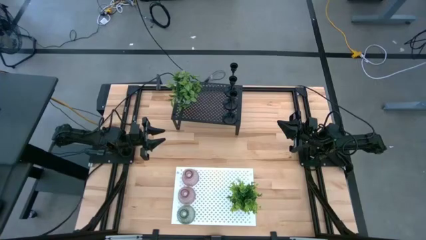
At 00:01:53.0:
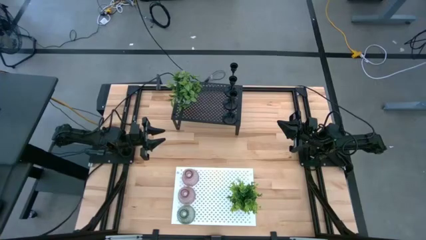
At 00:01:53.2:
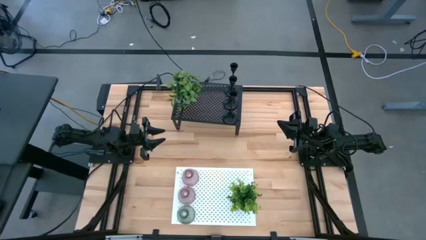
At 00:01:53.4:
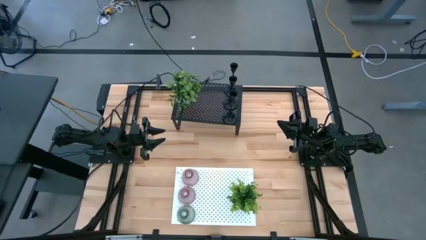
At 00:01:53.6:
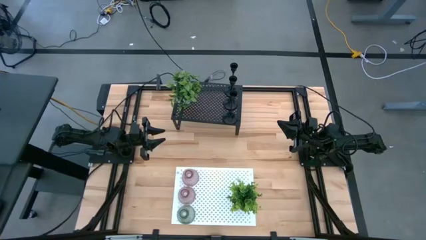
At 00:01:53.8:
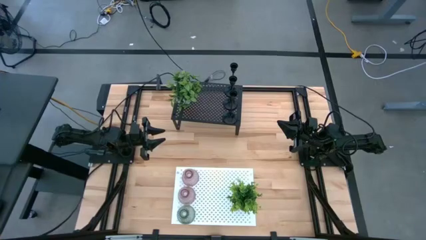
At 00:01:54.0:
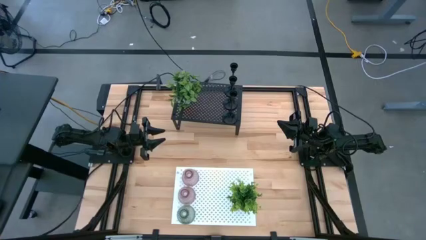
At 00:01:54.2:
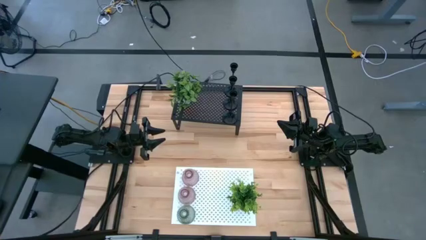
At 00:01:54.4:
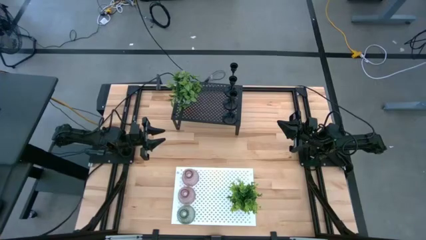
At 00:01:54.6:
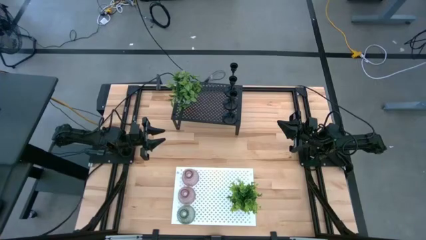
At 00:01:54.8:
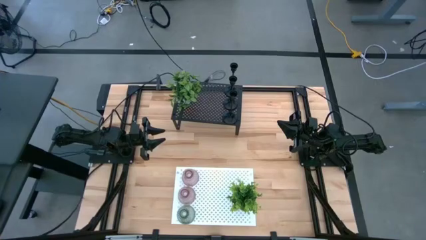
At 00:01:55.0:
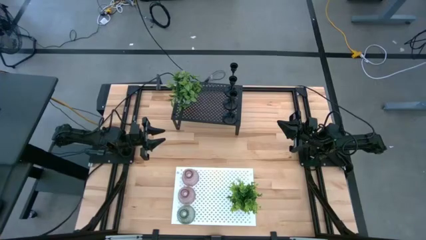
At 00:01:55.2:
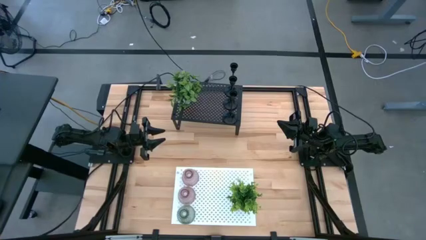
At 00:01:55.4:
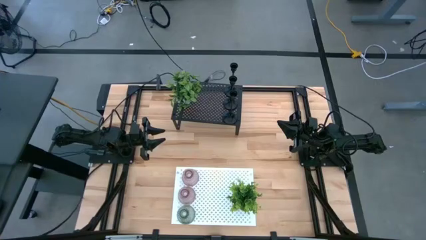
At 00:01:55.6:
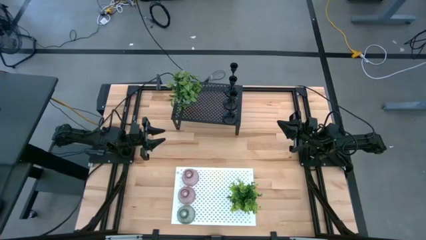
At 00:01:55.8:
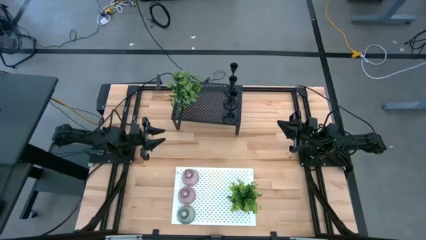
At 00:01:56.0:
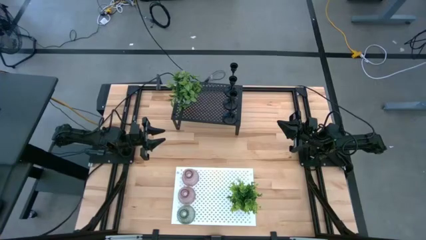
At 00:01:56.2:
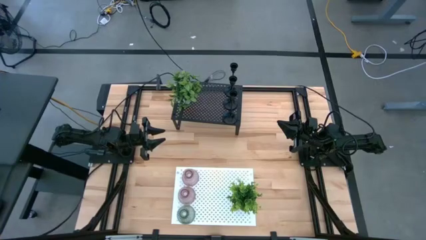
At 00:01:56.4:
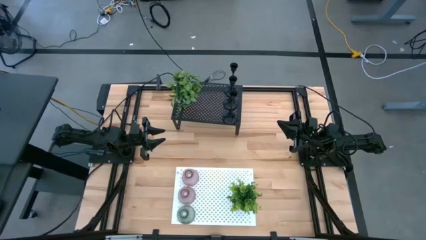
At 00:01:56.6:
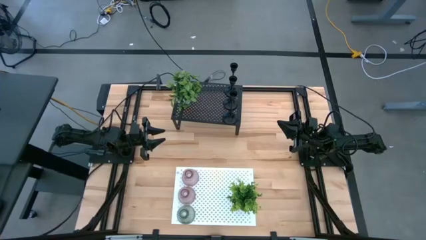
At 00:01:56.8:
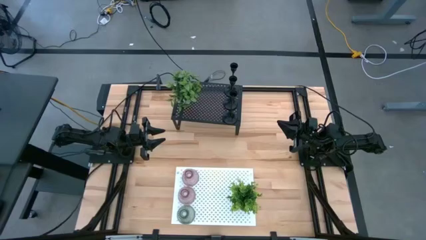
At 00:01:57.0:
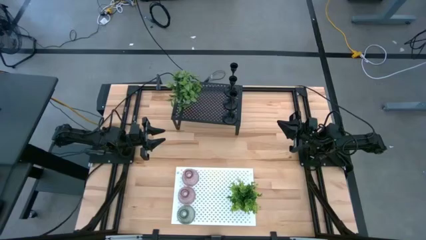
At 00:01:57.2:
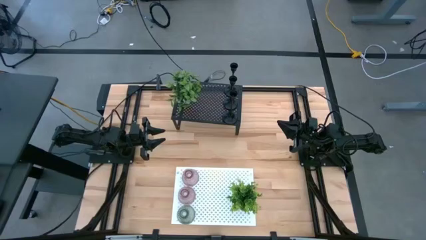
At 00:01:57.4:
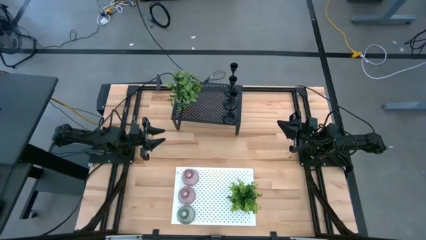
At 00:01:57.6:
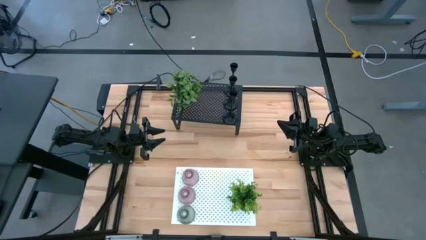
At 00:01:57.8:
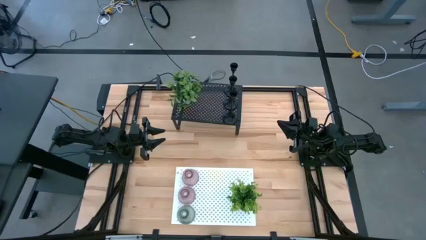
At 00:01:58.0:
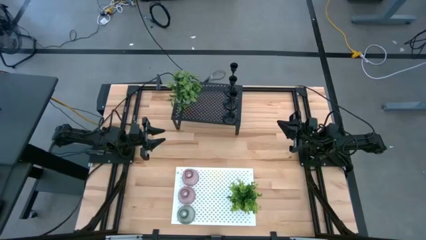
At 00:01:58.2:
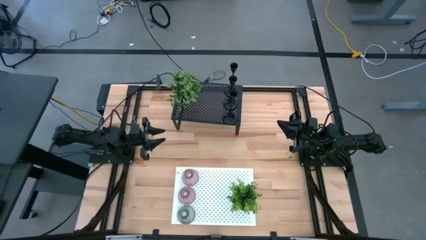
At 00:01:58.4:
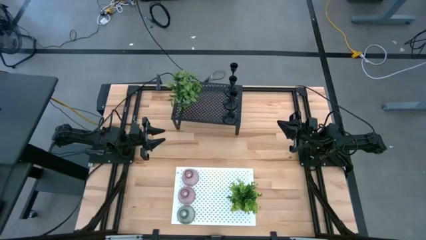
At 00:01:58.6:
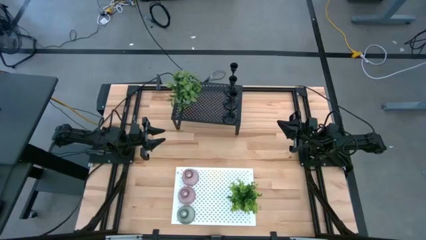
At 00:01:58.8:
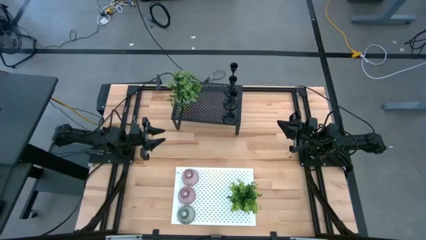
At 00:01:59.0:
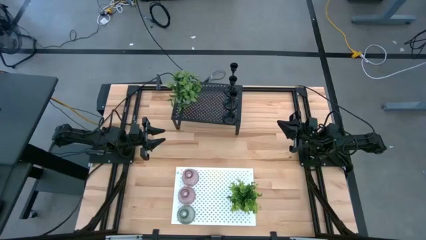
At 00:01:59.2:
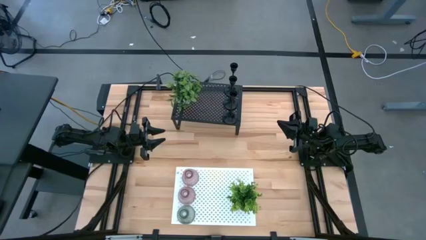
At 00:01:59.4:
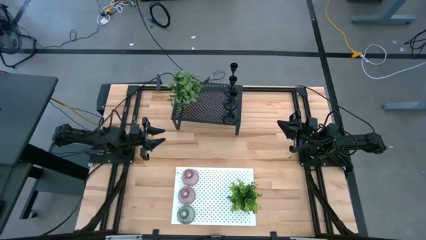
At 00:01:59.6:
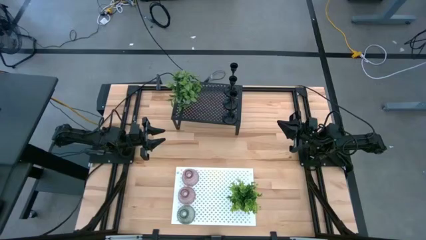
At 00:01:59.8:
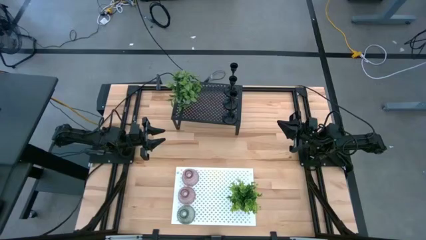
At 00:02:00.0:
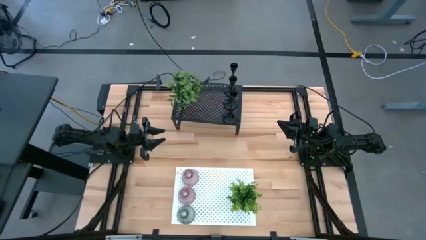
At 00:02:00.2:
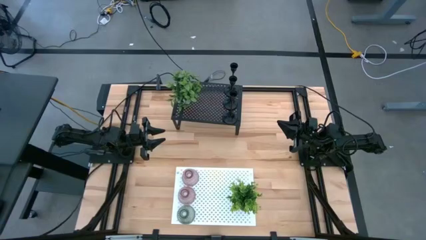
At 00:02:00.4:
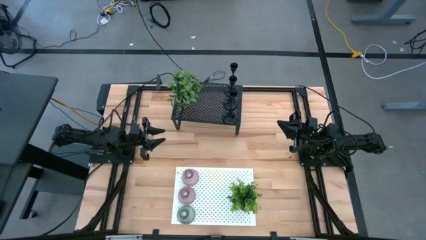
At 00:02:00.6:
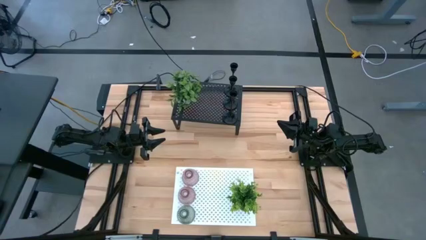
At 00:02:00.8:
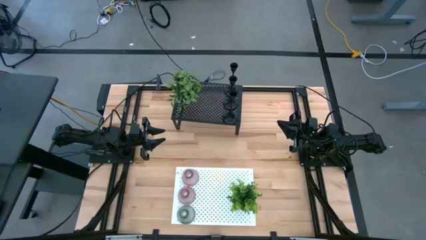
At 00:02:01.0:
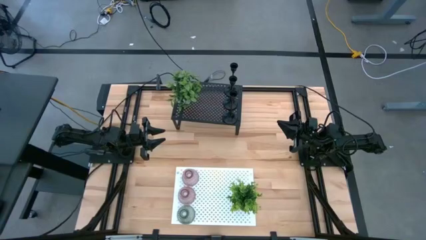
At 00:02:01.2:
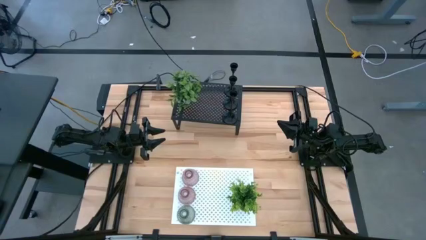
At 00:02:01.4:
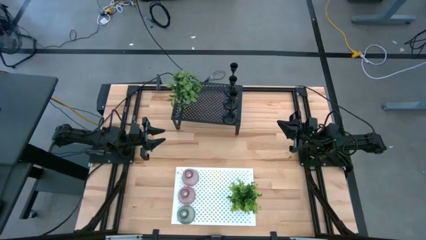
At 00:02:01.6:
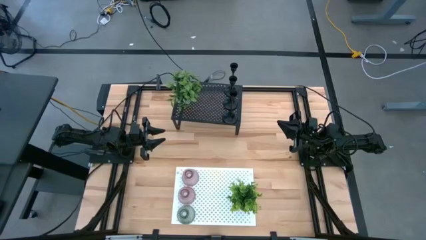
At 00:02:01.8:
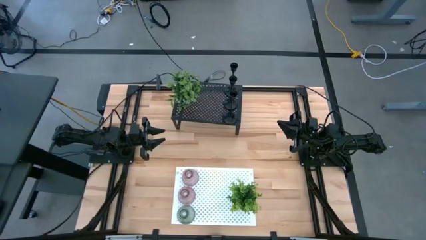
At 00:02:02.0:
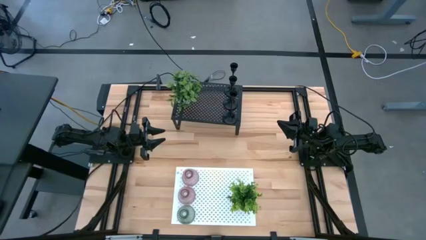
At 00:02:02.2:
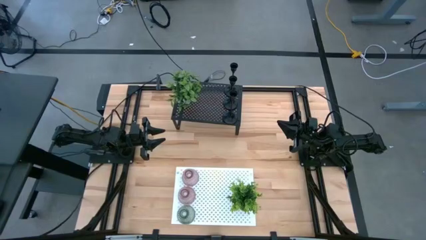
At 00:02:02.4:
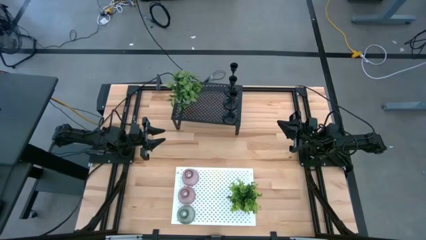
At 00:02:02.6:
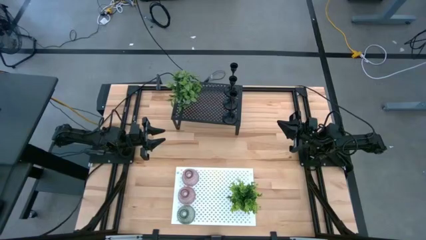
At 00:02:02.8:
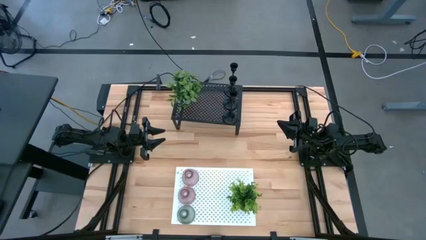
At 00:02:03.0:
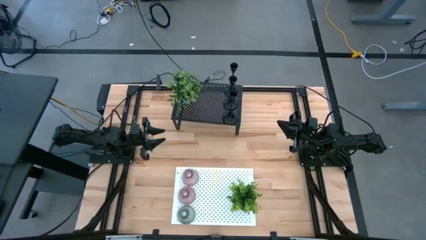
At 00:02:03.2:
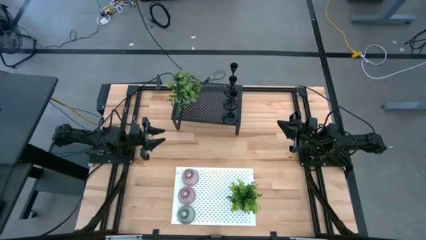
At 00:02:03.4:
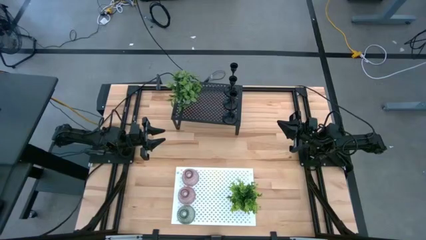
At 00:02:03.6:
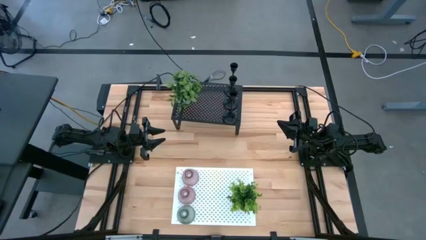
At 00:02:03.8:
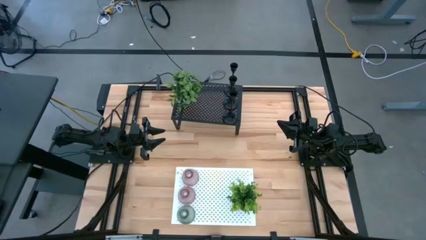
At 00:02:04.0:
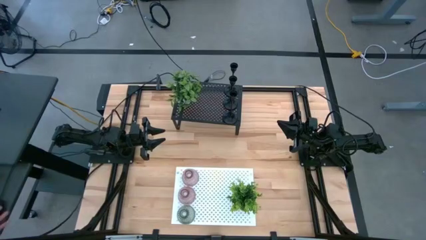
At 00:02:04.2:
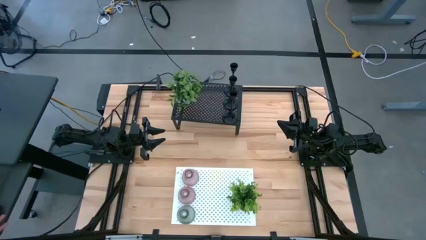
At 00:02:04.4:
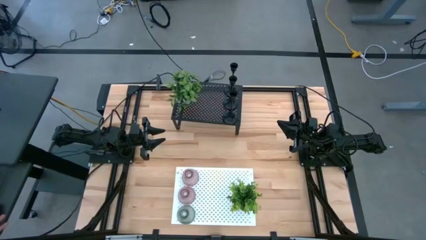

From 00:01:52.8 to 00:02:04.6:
Task: Pick & Place candle stick holders
Return to Home Position

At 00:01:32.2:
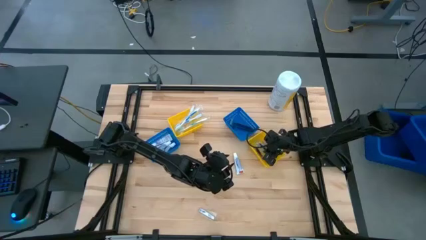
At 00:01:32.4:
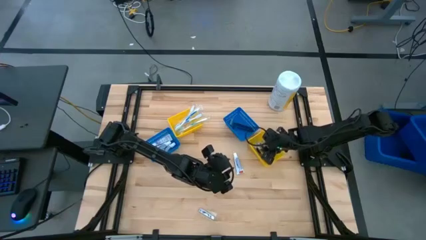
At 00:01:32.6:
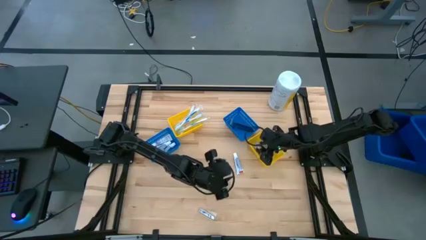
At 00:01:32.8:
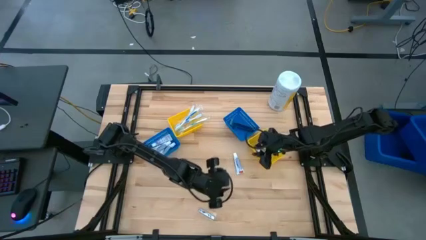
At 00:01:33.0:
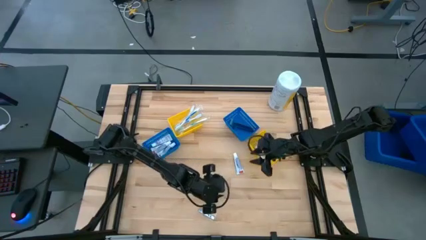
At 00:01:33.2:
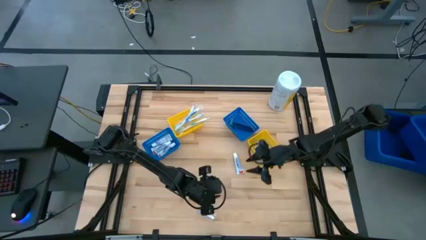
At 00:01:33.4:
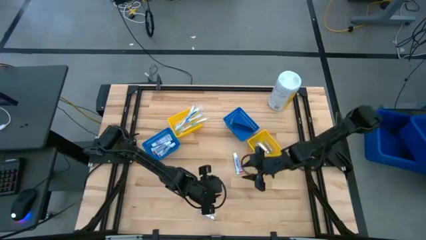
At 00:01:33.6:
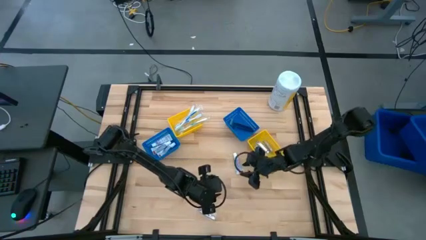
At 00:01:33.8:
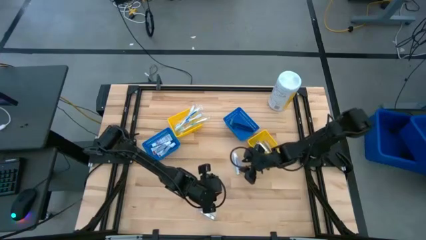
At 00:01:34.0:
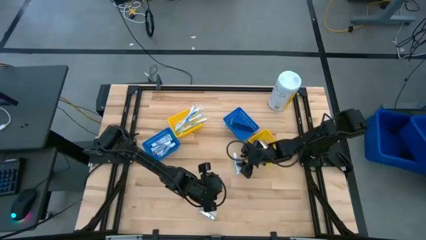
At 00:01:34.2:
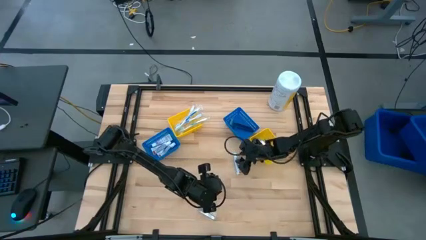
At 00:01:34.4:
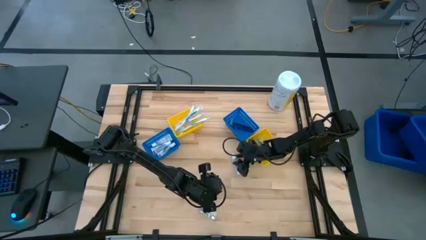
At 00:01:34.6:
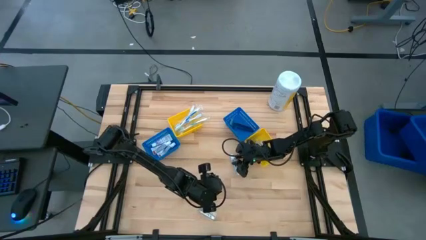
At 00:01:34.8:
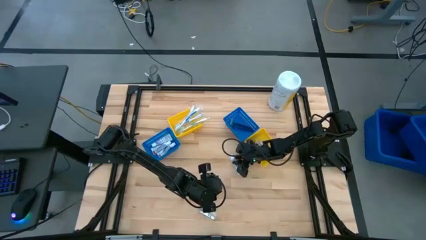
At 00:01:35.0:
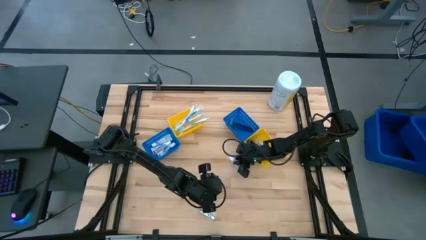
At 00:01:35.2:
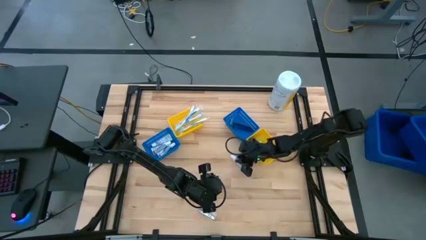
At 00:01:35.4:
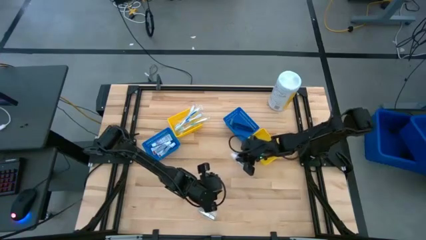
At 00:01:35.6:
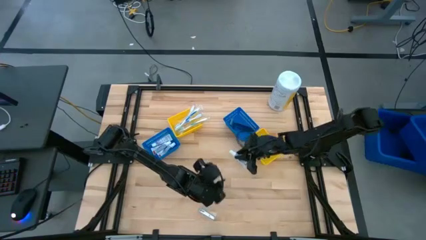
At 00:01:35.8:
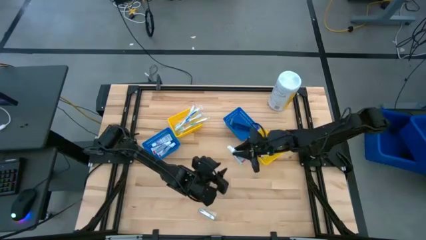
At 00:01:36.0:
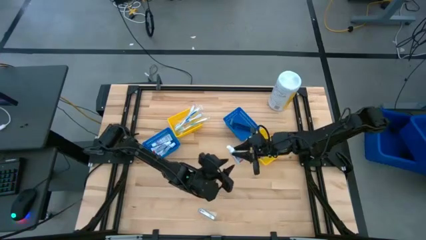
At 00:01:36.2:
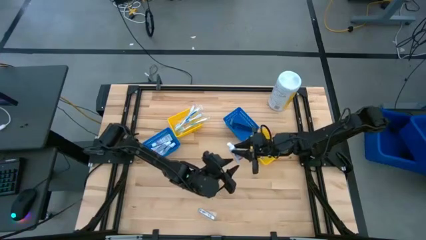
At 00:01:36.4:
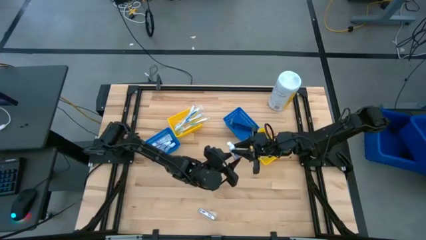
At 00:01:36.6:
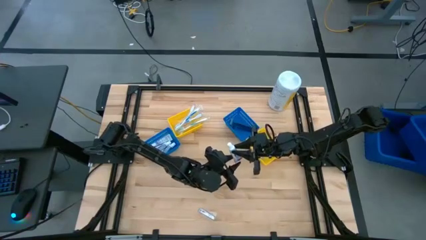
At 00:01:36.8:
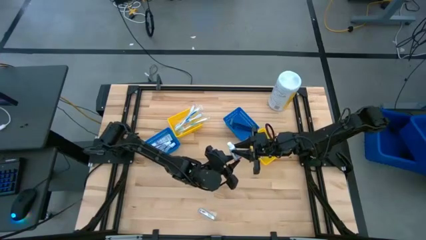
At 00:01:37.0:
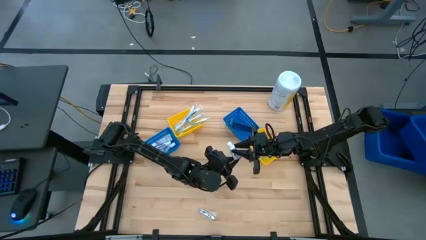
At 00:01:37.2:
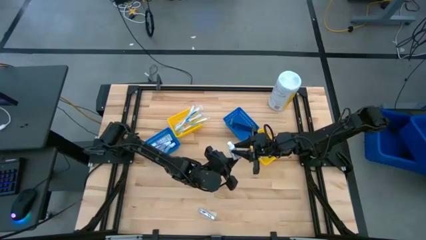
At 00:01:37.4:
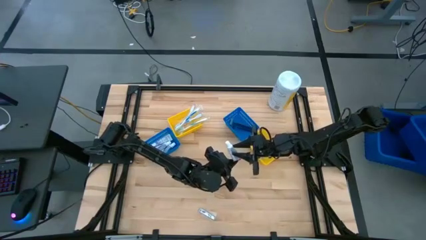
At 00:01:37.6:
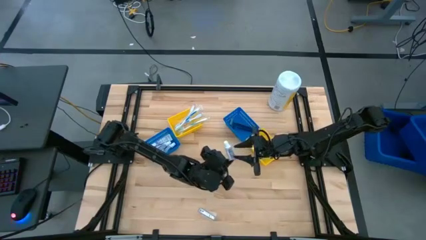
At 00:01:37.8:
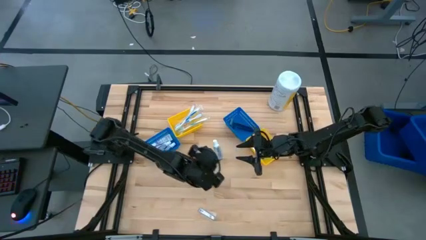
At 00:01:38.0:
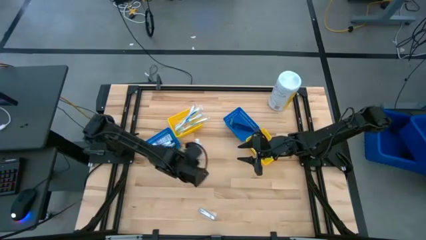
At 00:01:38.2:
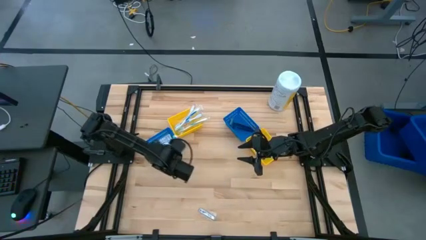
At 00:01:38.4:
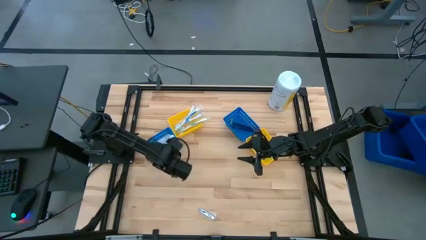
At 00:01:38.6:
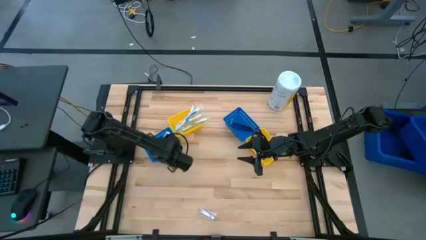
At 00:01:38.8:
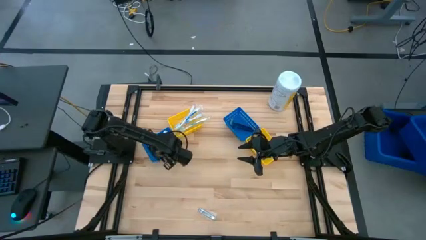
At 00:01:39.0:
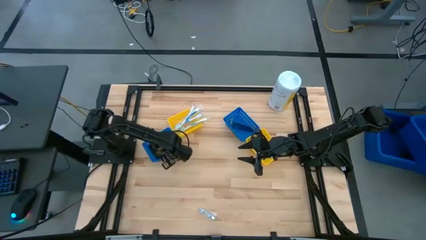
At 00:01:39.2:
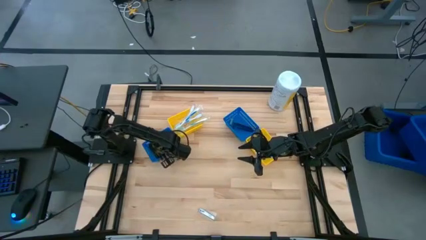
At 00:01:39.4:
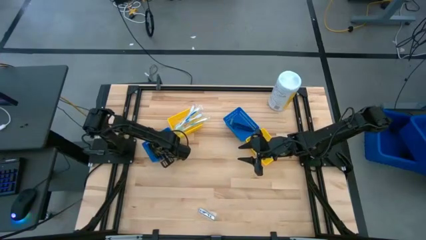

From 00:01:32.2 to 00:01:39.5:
Task: Pick & Place Travel size toiletries
Put the toothpaste into the left blue bin
